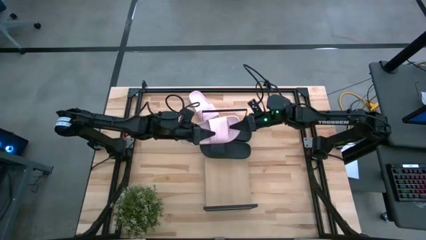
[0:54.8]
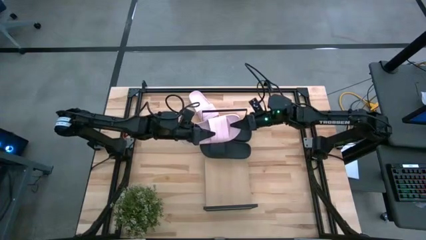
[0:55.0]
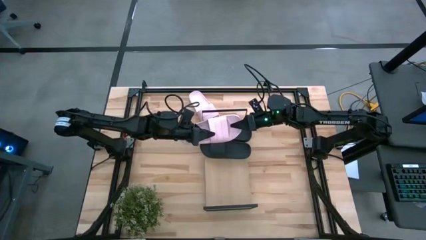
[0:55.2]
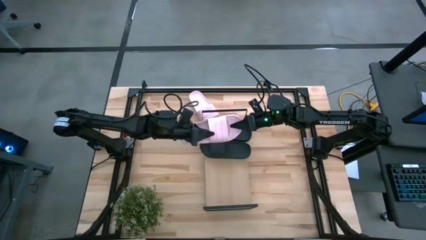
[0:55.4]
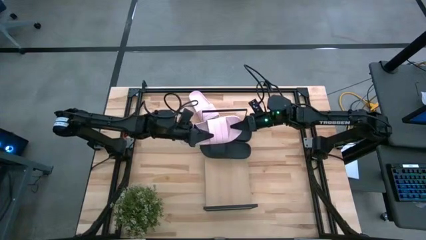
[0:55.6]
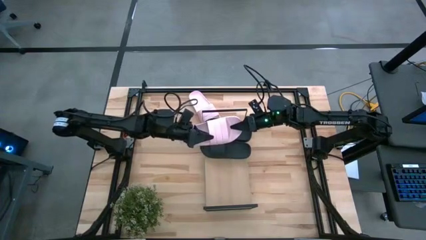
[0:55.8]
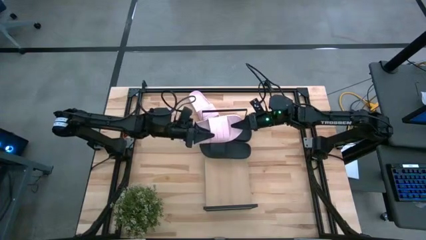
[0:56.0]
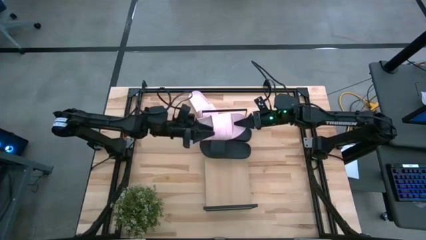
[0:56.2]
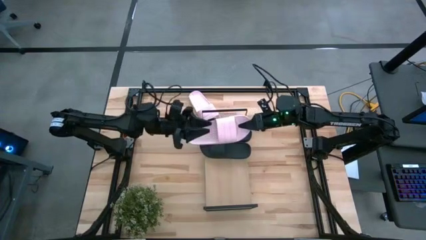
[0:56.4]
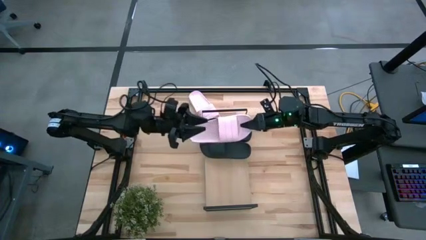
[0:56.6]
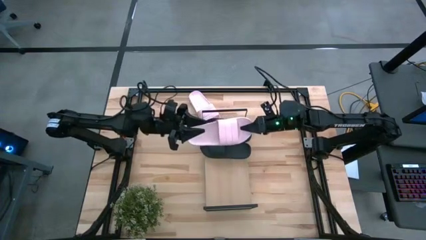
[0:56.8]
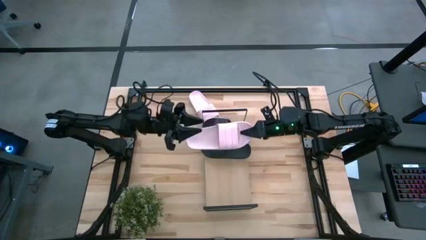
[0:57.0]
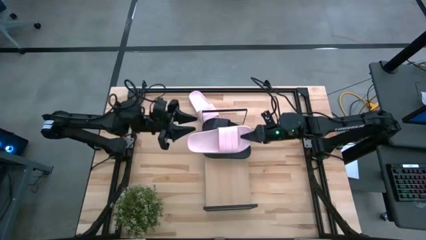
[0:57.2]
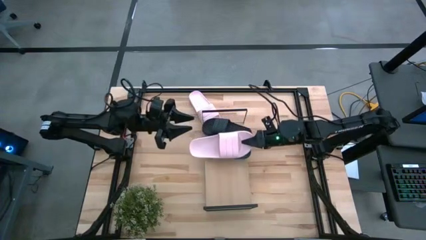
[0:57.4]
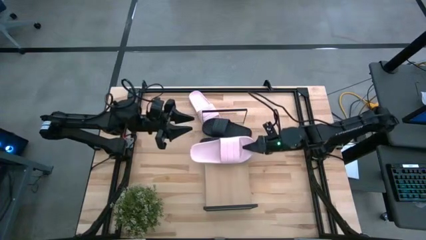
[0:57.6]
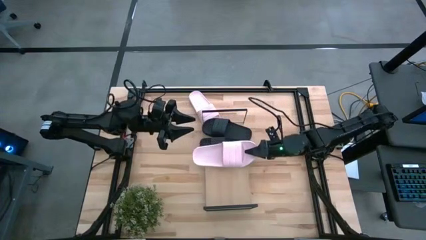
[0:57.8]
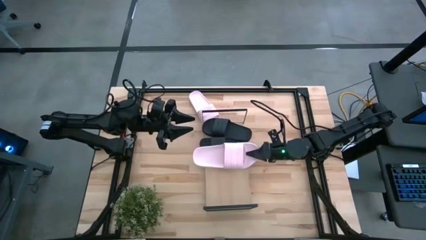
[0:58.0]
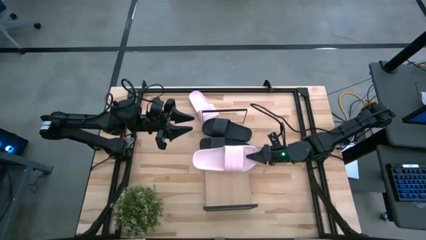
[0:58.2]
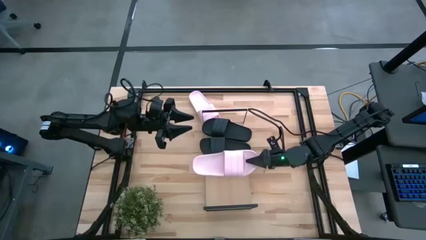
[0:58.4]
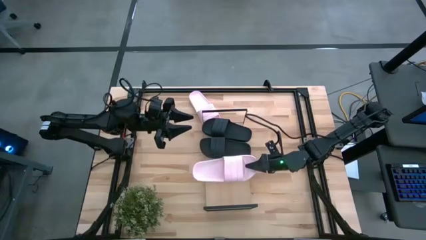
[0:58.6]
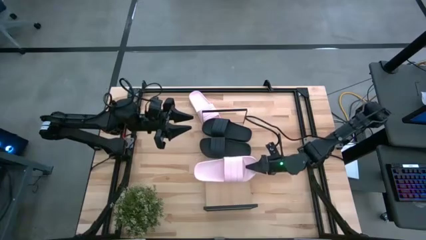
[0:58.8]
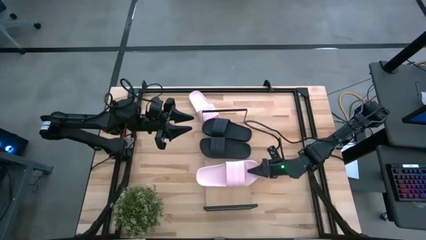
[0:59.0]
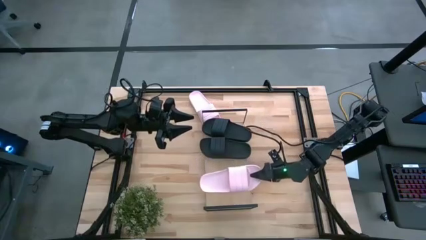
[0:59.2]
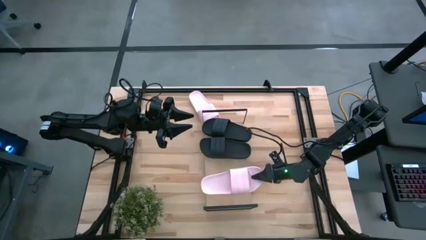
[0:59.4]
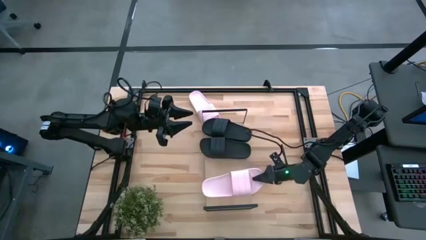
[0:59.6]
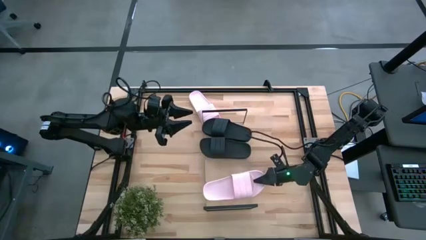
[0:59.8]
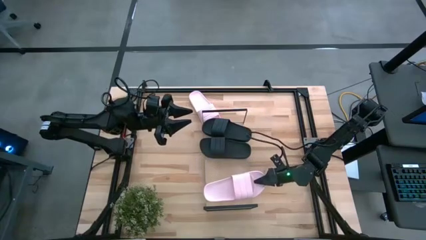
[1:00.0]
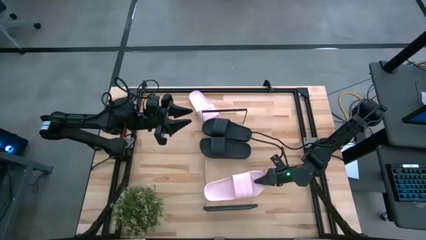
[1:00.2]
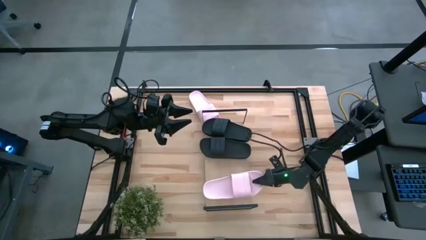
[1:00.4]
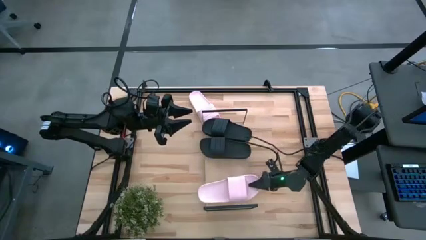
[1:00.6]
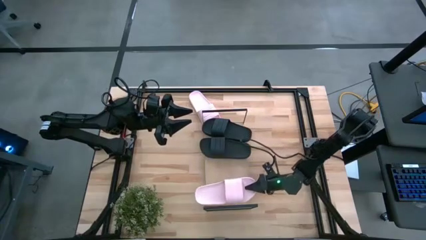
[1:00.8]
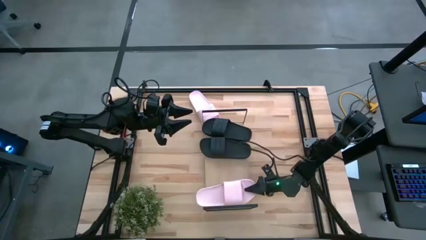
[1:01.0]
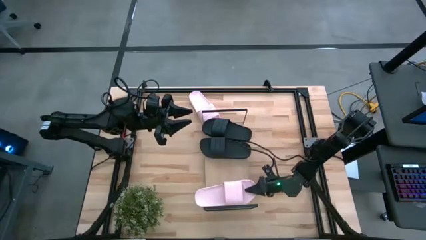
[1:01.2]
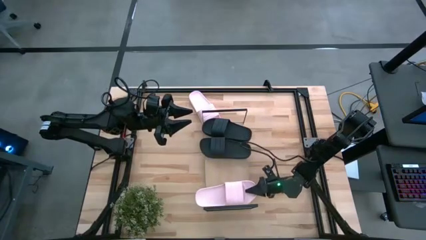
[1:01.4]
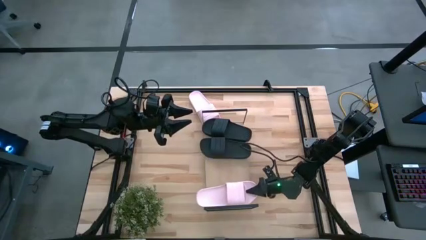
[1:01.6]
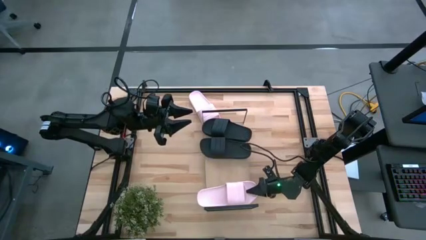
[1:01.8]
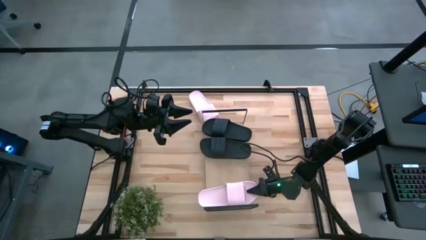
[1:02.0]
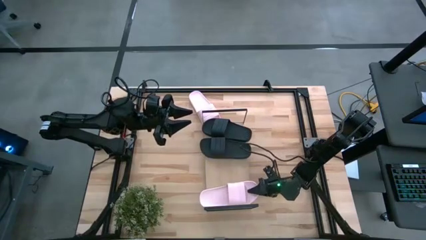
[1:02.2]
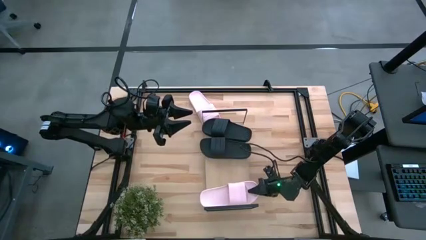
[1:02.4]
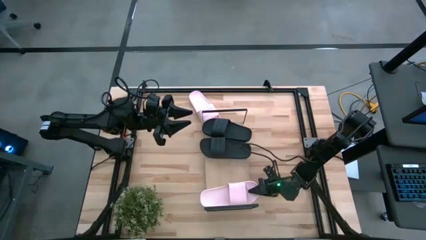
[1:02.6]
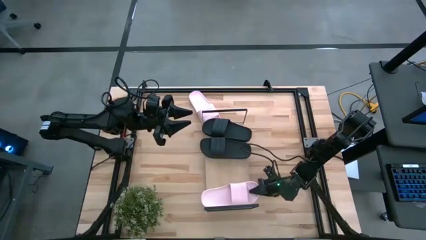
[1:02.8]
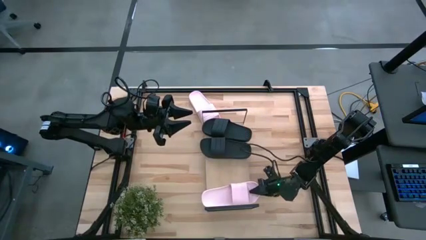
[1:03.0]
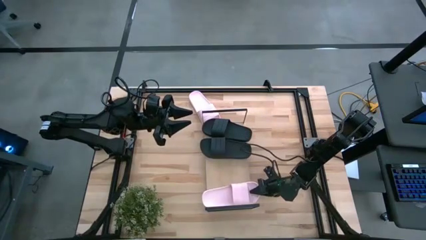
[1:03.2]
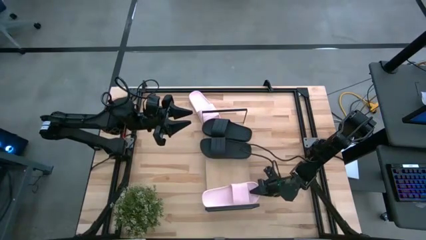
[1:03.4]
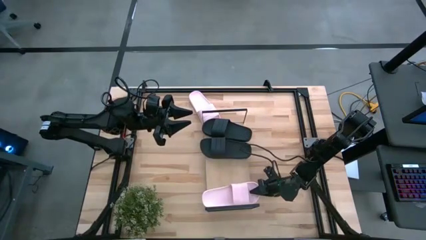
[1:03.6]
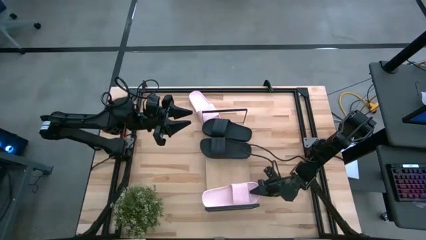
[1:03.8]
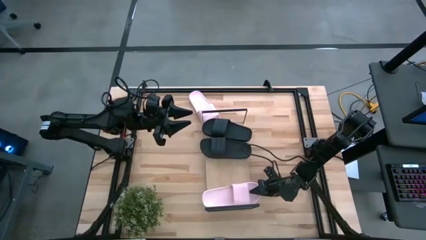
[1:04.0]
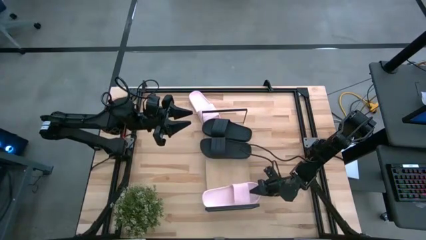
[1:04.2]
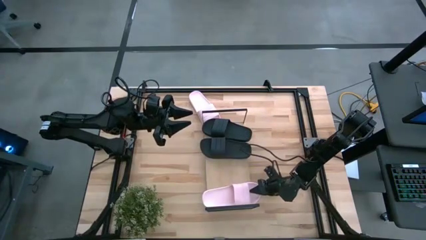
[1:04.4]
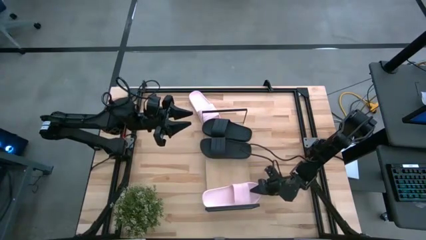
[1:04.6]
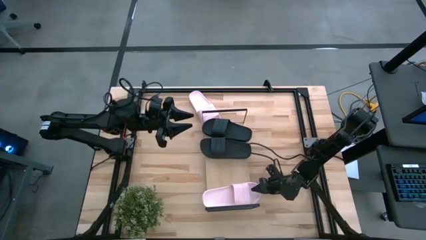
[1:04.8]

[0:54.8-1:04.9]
Task: Pick and place slides into the shelf
Put the bottom pink slide on the shelf
